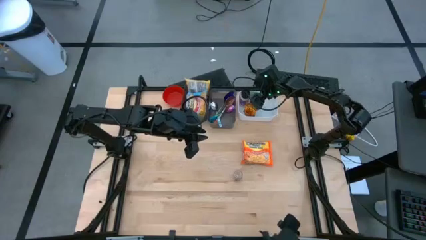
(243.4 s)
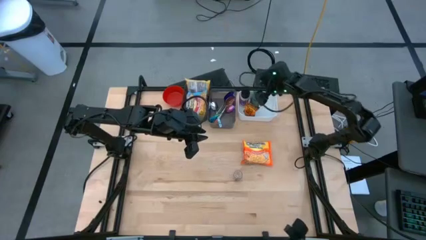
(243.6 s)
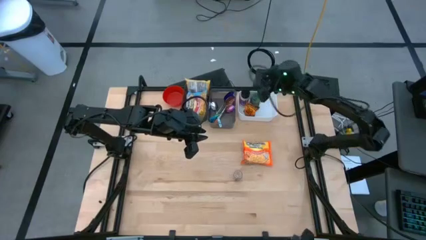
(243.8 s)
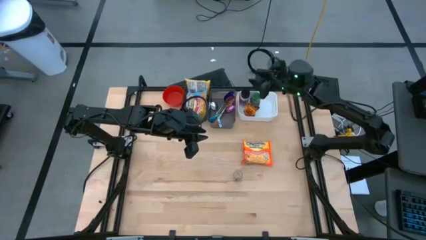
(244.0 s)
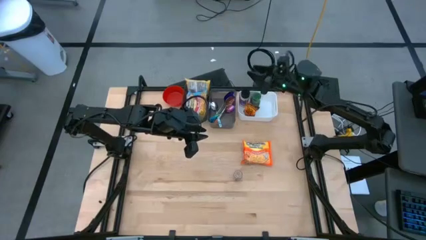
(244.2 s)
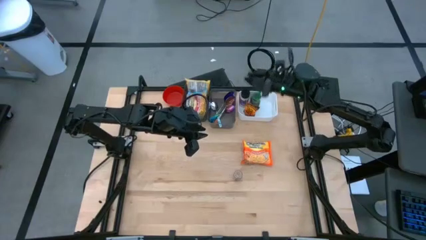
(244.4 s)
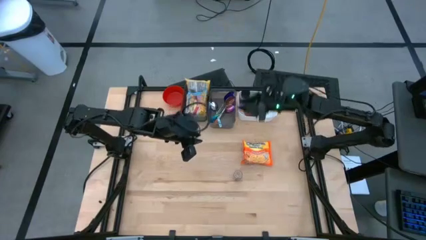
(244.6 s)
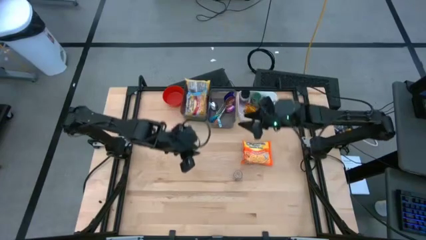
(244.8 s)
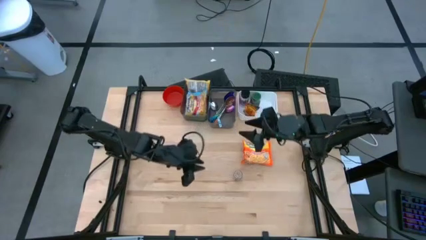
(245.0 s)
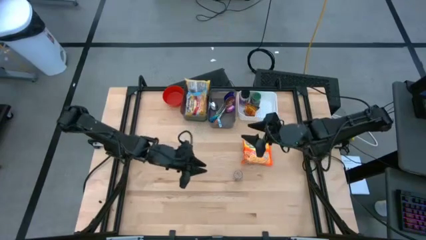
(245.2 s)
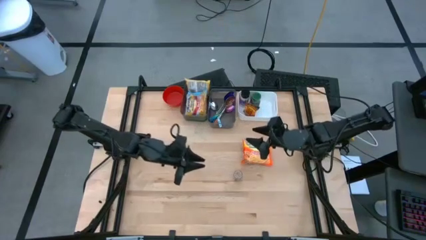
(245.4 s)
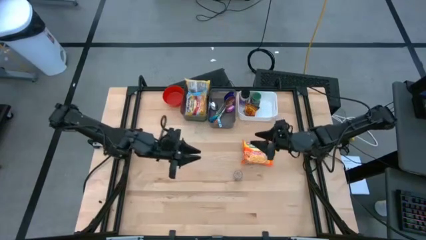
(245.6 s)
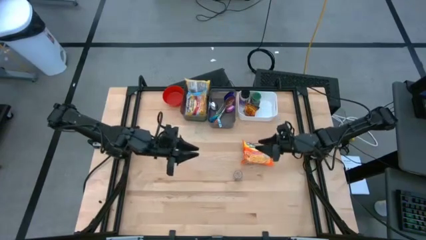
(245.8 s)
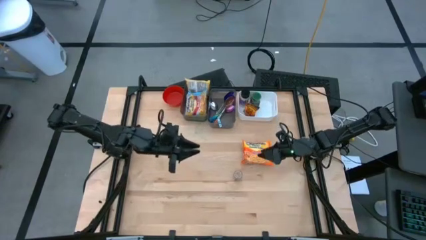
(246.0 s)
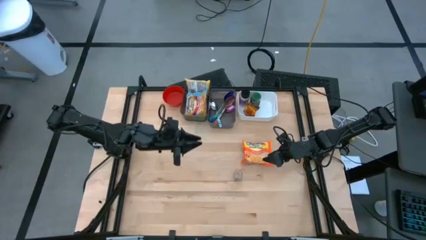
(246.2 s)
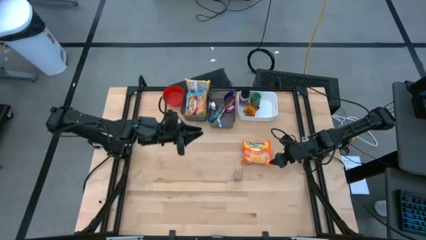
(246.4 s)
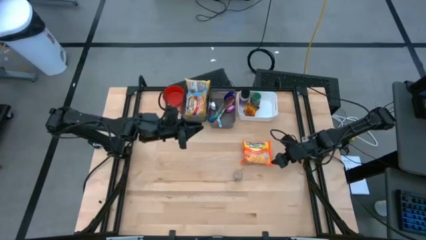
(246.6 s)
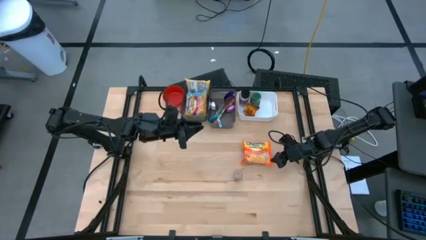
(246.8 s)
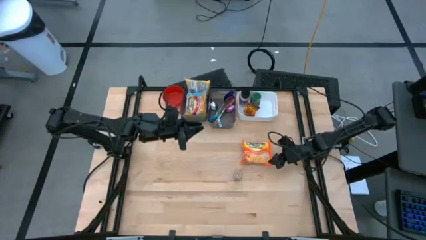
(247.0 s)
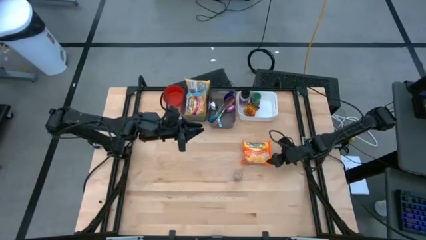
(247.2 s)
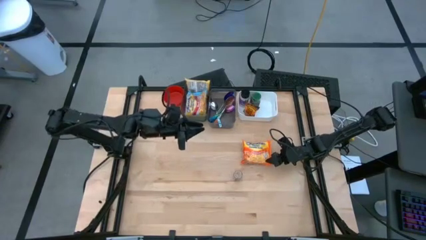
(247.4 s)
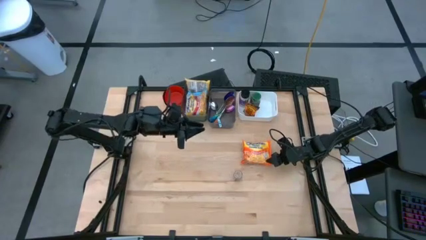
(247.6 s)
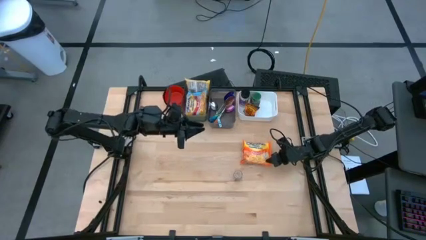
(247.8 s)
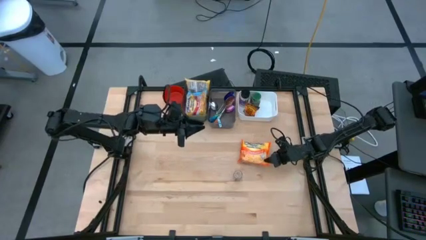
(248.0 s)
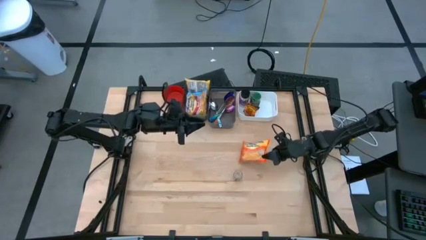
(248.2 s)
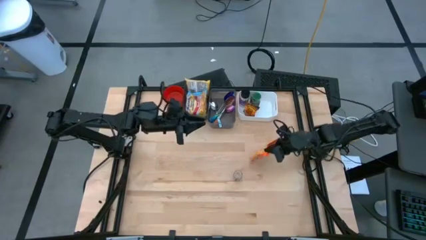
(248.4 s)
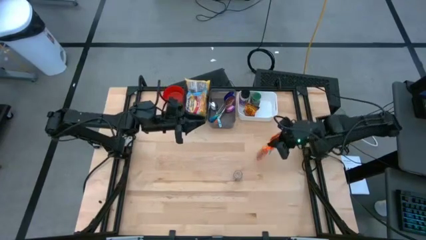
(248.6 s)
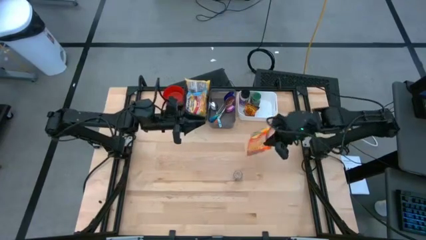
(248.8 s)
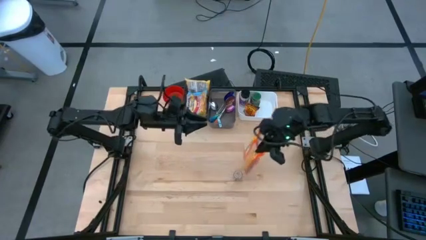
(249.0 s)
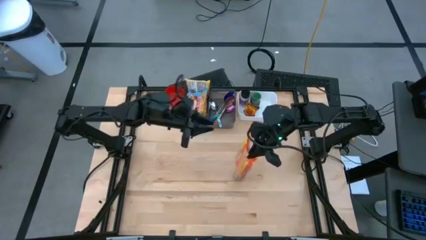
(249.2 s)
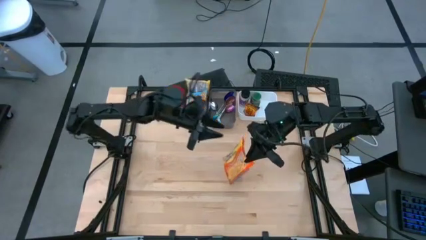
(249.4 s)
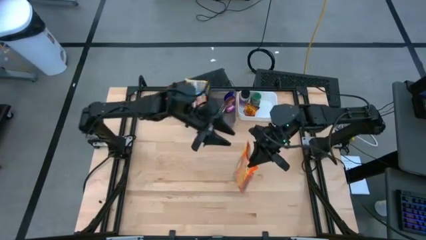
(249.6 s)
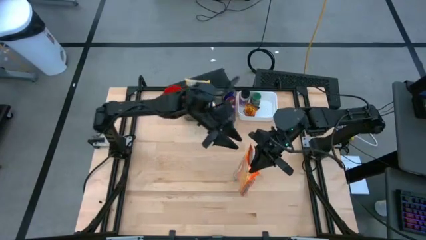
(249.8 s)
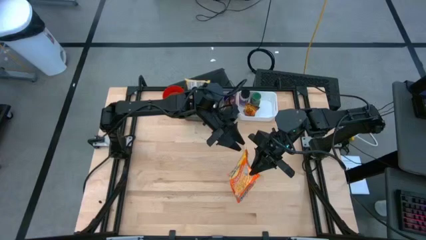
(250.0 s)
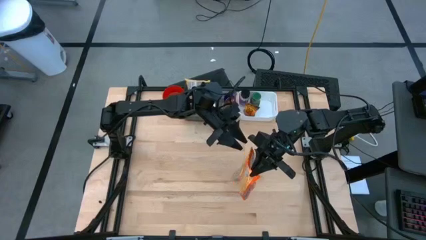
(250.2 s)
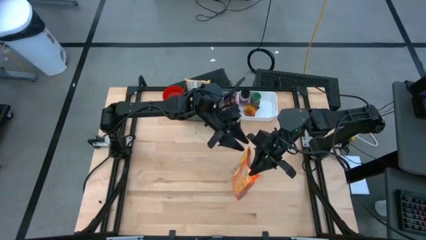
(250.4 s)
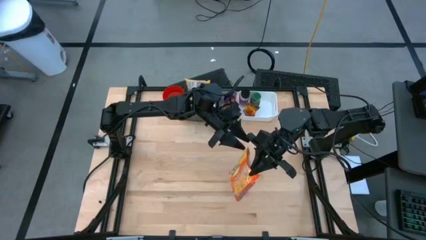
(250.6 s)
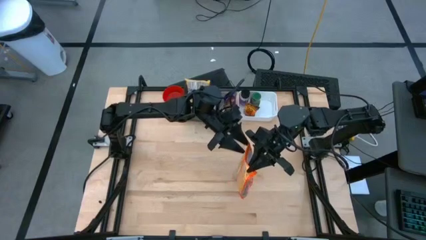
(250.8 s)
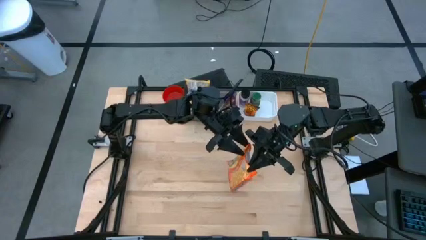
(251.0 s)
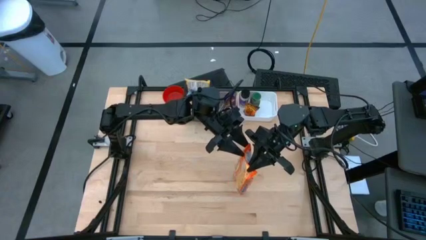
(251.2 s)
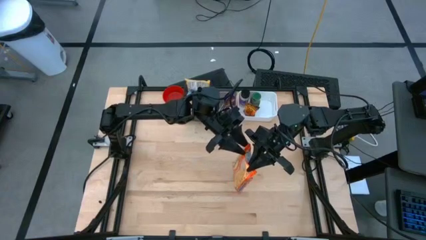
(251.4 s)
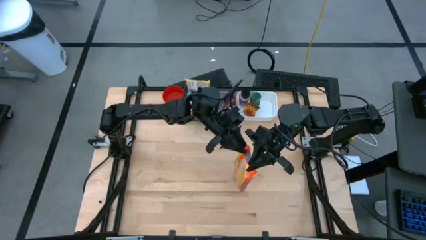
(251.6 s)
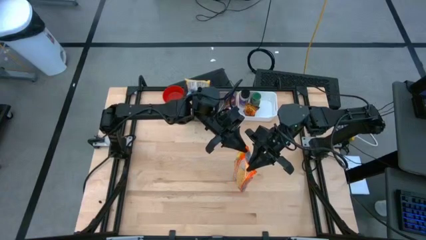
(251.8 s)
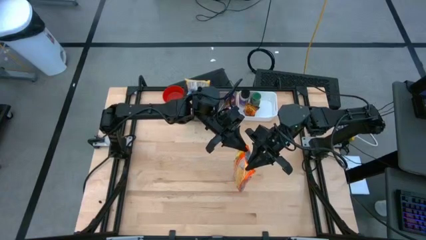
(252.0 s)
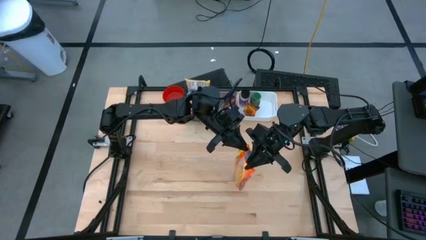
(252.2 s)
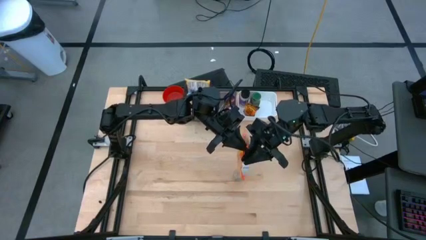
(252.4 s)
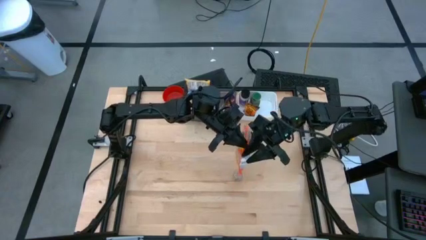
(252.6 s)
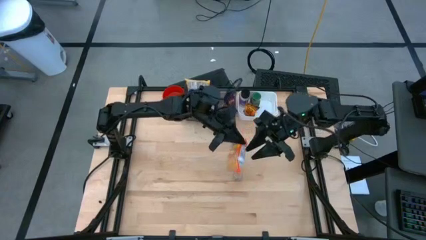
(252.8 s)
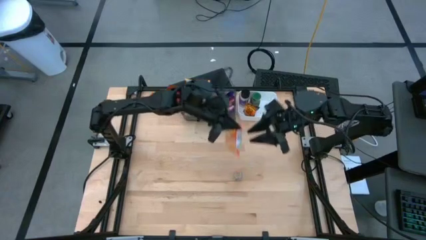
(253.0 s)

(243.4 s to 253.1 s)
Task: Pick & Place Food Item
Put the orange noodle pack into the left black bin

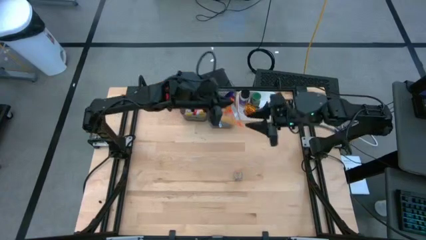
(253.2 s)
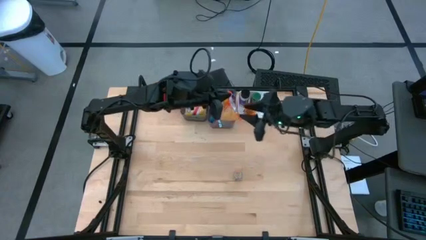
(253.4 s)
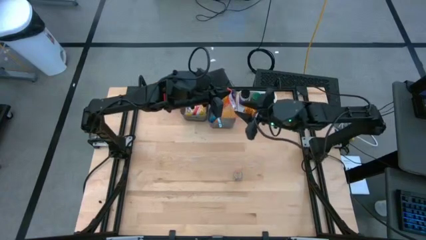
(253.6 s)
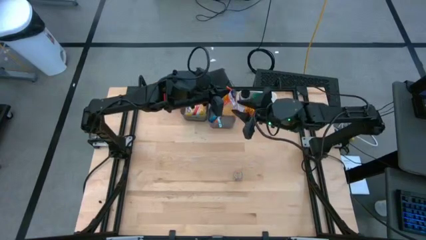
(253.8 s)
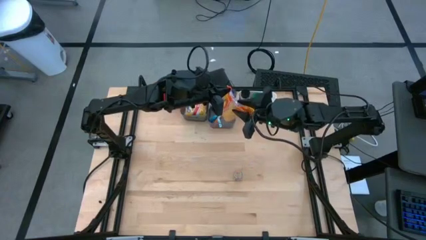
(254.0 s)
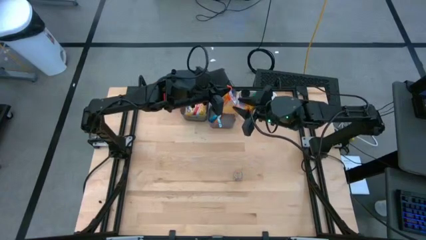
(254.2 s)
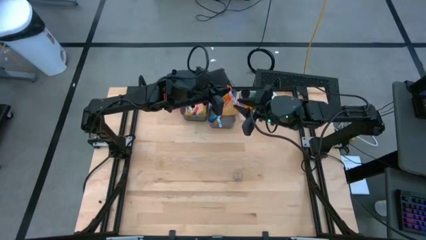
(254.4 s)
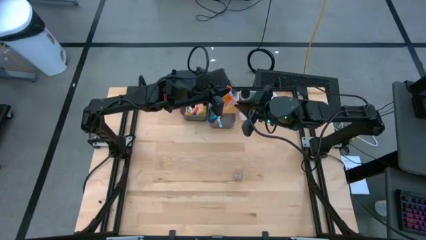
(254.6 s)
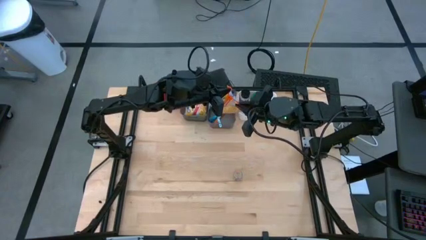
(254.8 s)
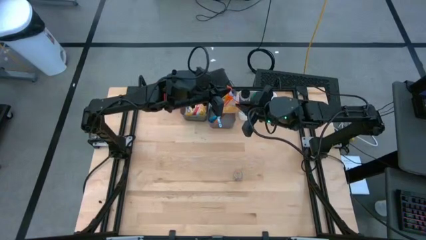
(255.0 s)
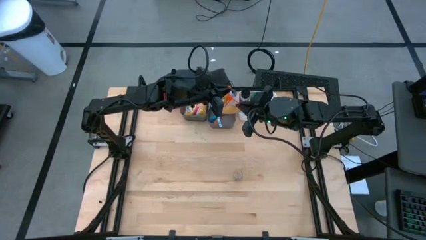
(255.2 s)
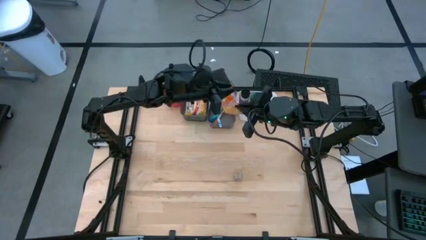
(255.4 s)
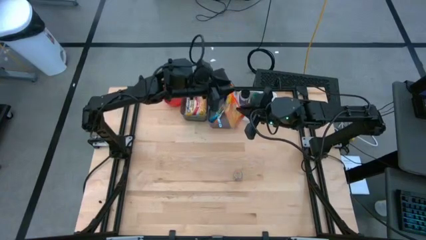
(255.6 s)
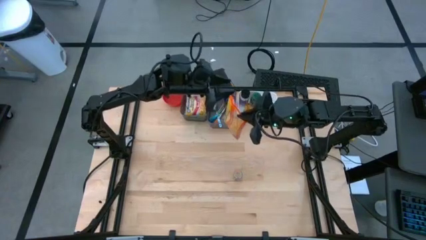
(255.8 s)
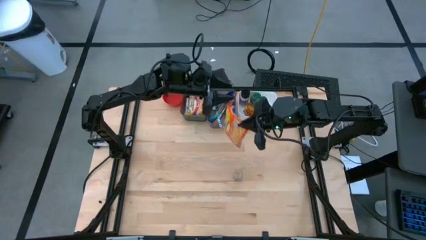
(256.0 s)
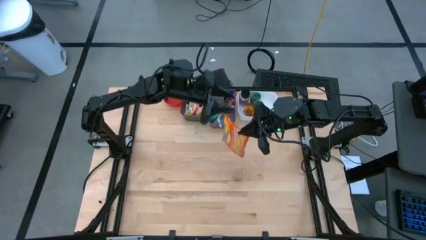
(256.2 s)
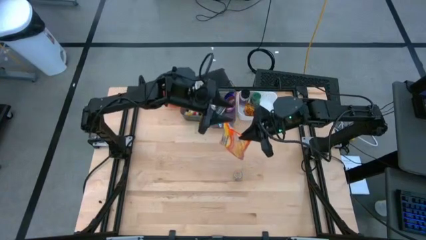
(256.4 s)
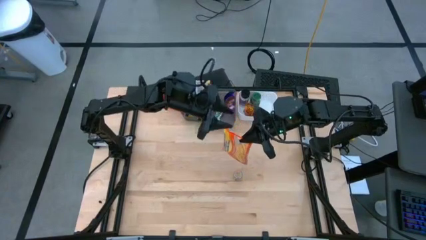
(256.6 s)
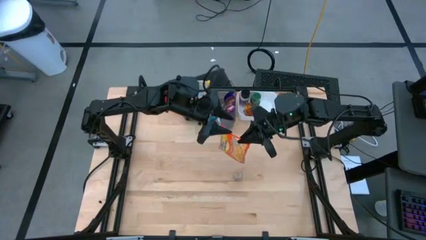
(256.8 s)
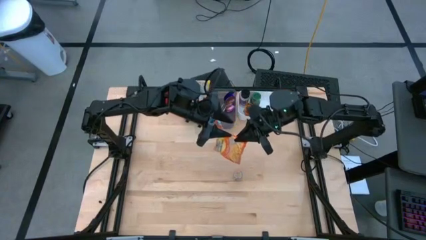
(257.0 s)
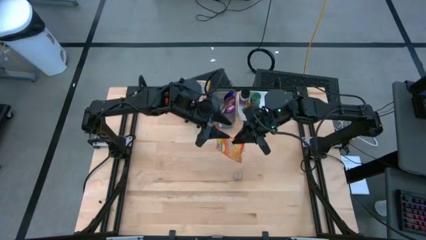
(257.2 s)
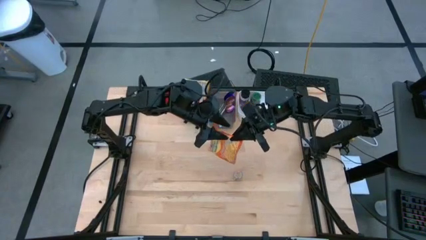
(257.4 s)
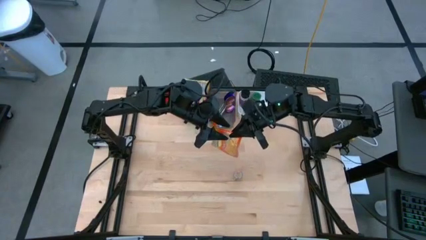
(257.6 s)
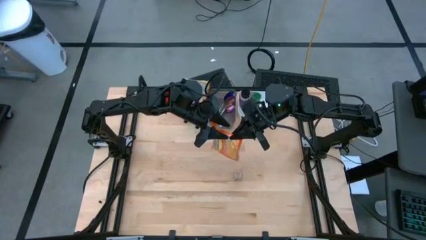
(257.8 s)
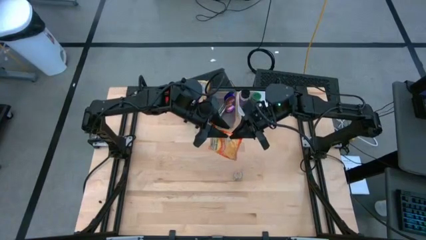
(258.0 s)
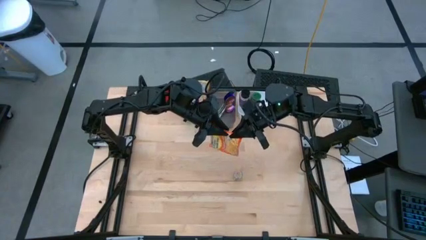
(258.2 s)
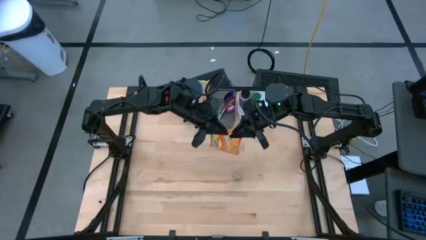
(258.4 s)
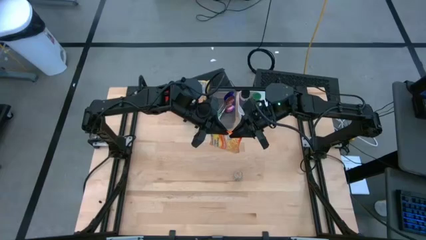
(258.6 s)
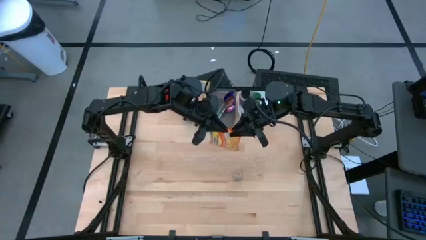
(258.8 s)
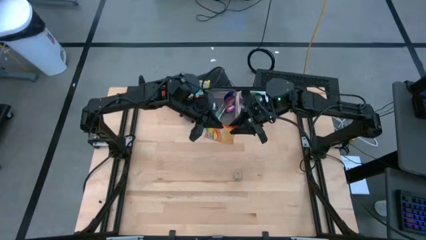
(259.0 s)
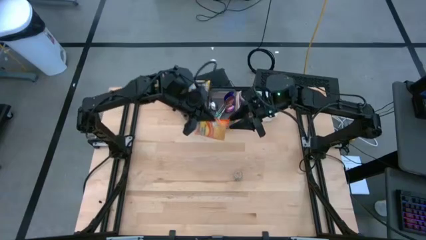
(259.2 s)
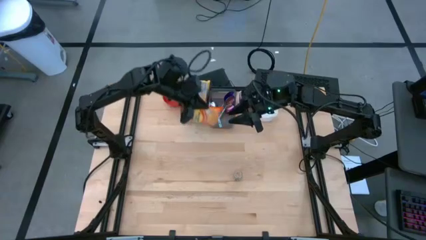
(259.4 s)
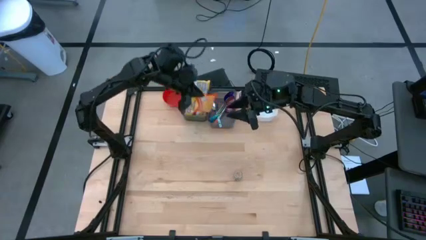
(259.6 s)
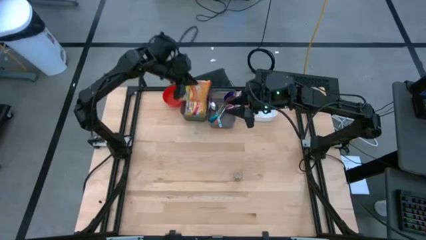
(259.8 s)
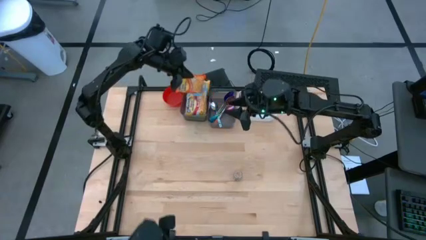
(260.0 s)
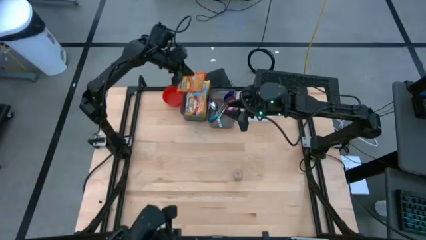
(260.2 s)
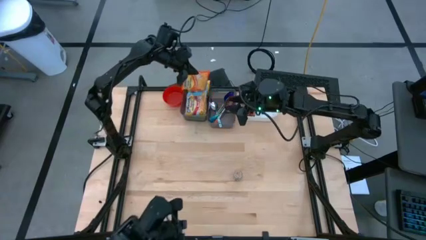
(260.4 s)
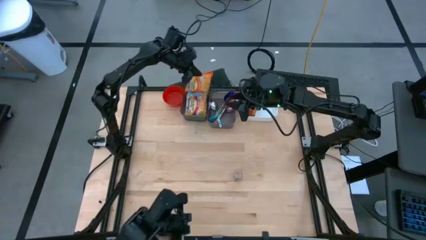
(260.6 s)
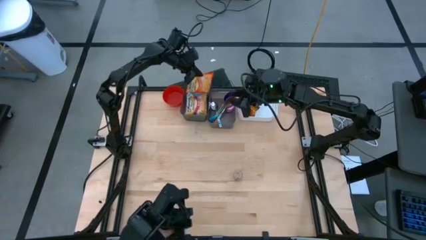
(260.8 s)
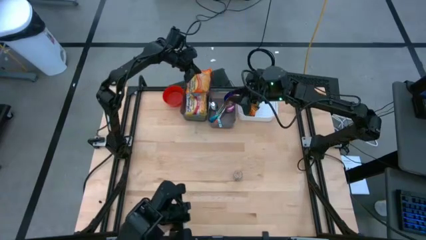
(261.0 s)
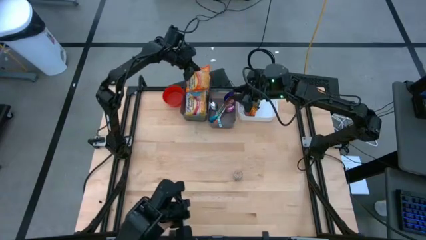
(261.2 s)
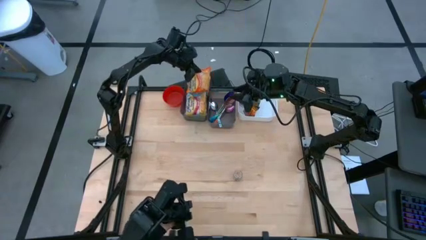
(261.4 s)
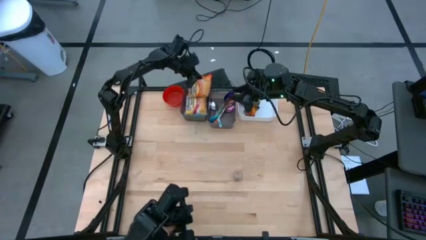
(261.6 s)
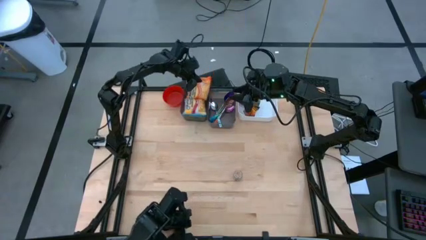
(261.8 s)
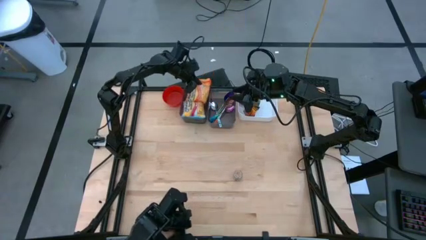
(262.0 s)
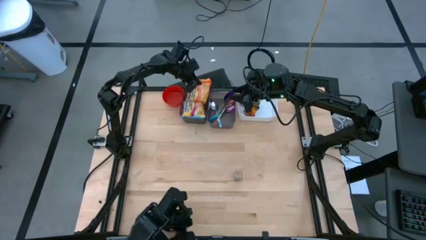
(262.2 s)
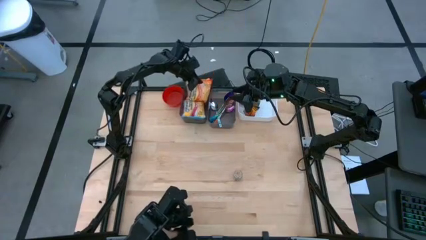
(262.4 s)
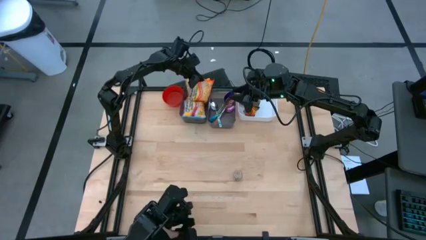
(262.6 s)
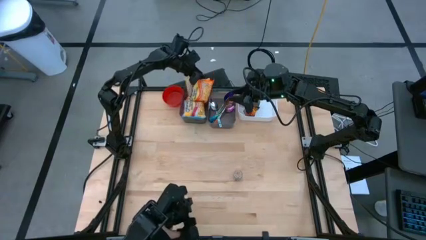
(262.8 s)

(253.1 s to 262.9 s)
Put the orange noodle pack into the left black bin
